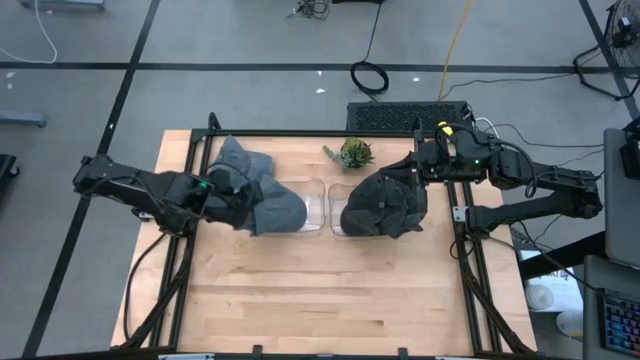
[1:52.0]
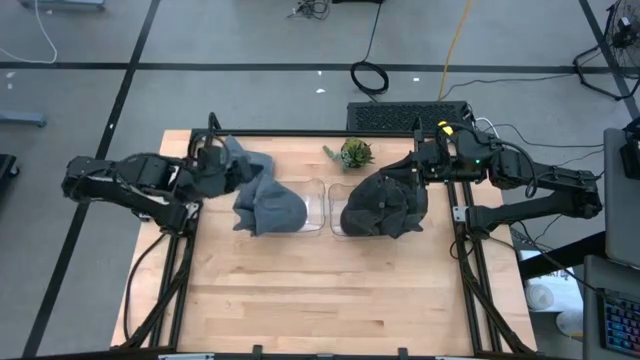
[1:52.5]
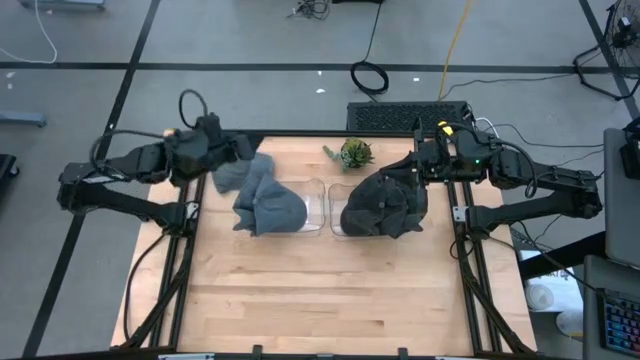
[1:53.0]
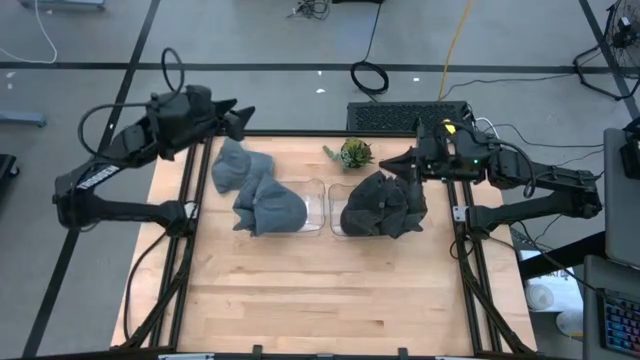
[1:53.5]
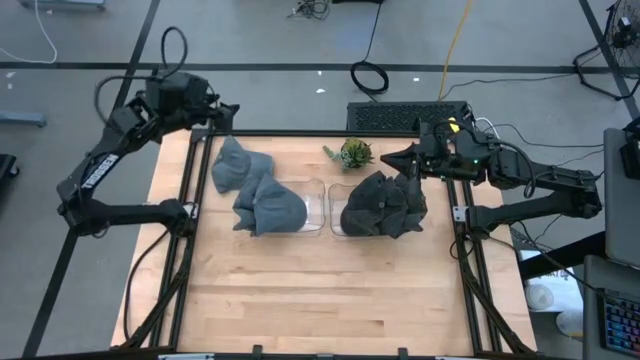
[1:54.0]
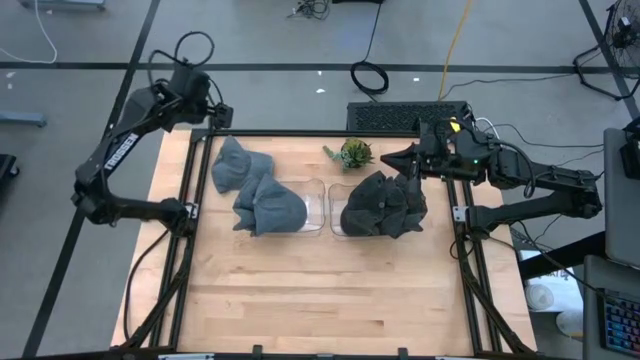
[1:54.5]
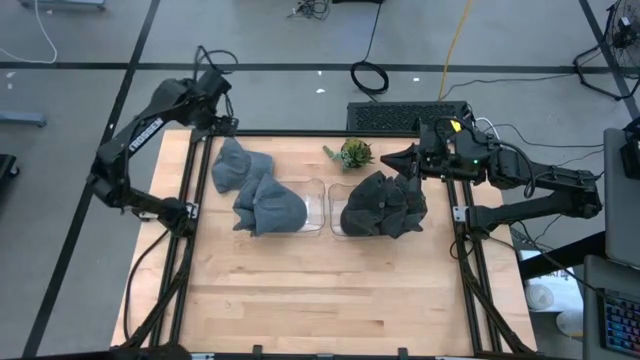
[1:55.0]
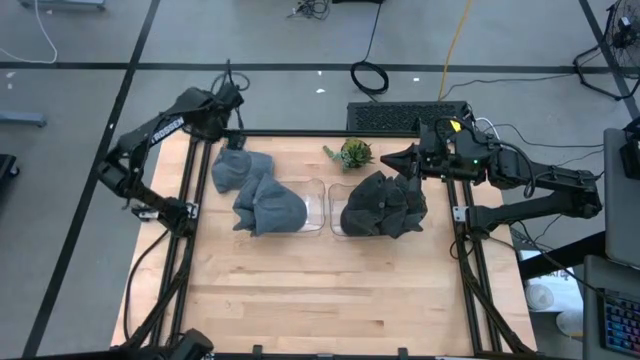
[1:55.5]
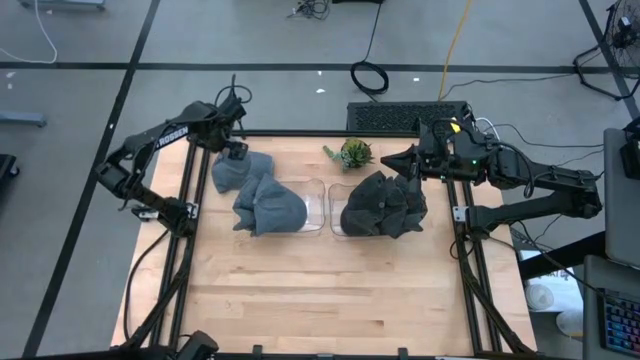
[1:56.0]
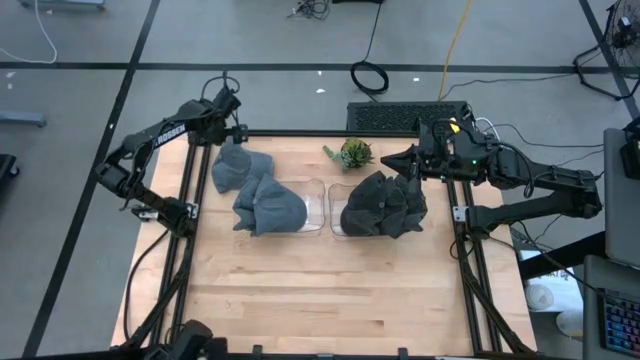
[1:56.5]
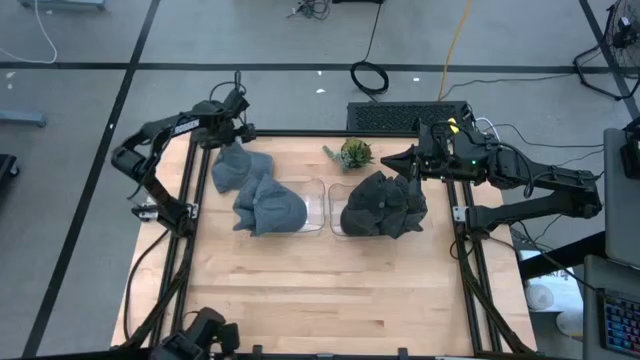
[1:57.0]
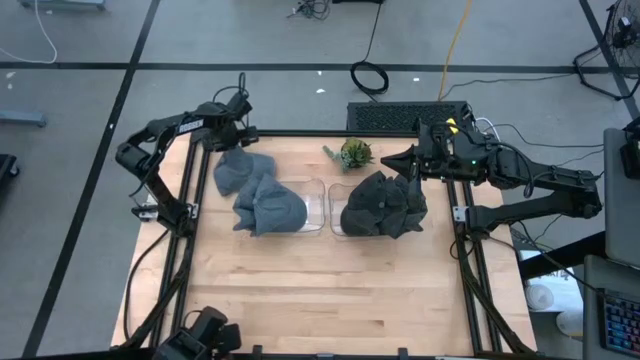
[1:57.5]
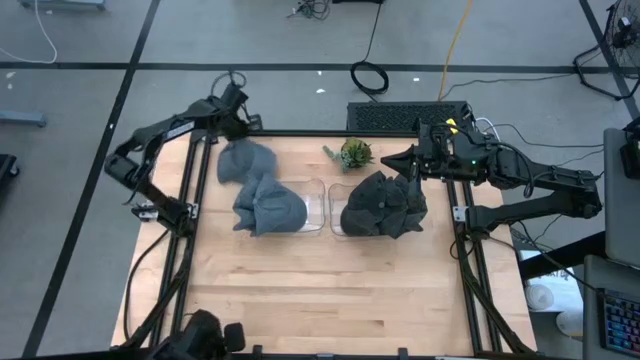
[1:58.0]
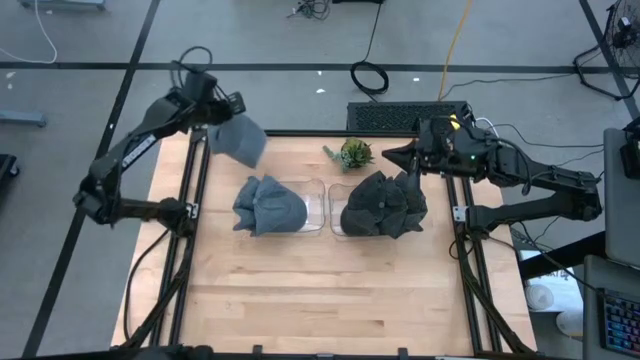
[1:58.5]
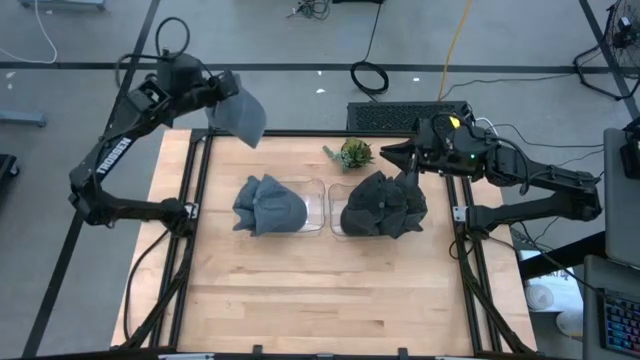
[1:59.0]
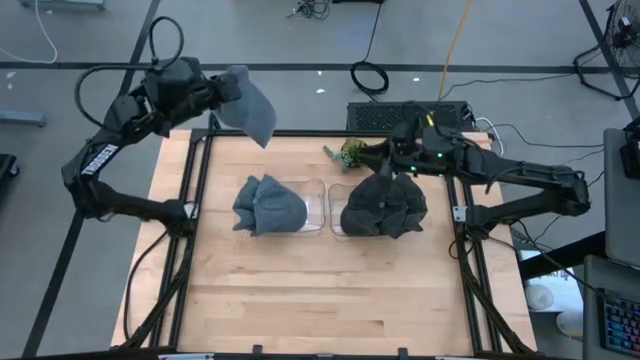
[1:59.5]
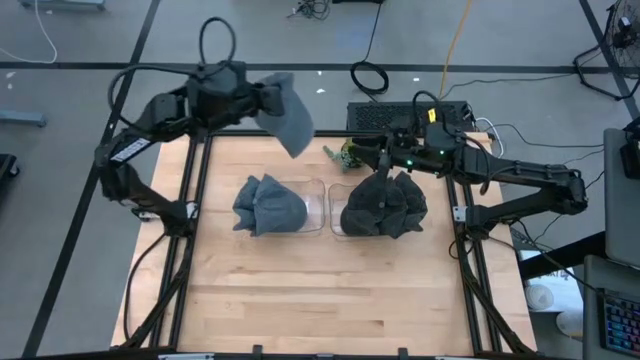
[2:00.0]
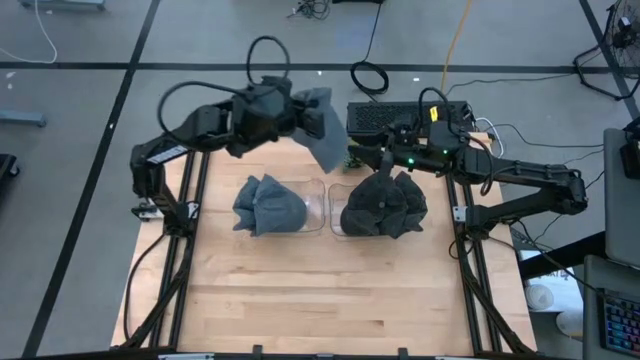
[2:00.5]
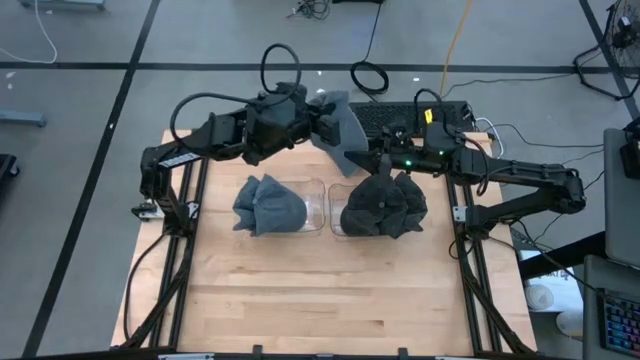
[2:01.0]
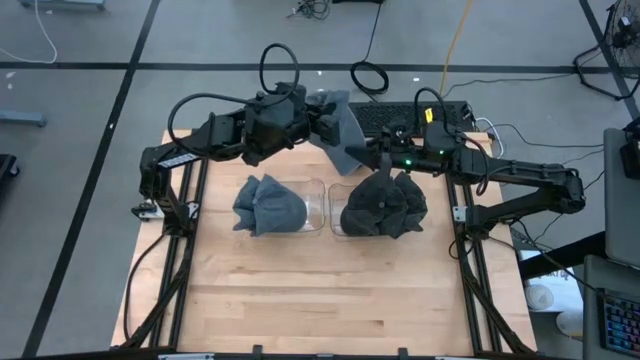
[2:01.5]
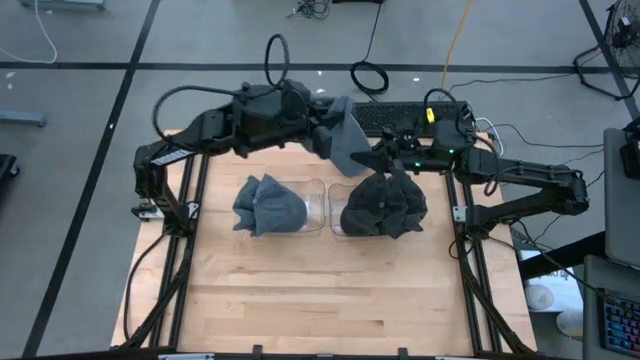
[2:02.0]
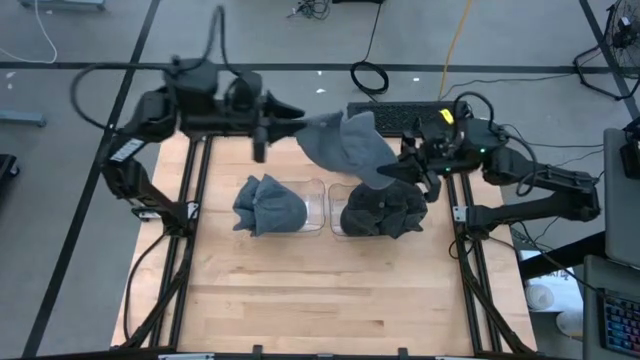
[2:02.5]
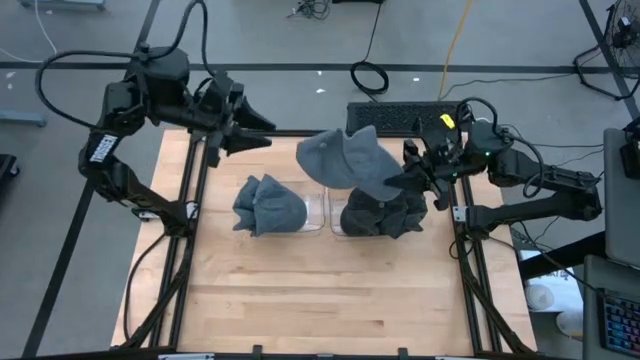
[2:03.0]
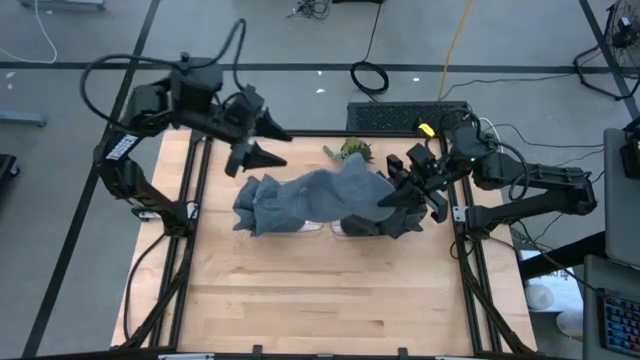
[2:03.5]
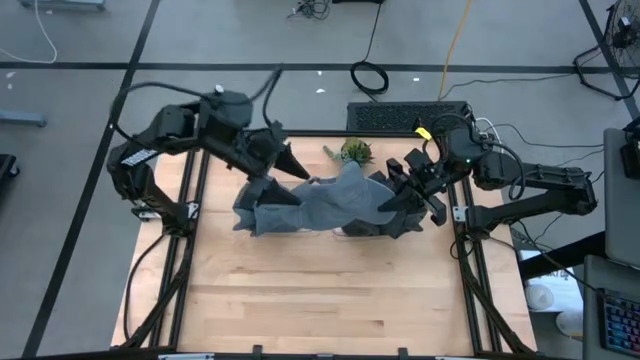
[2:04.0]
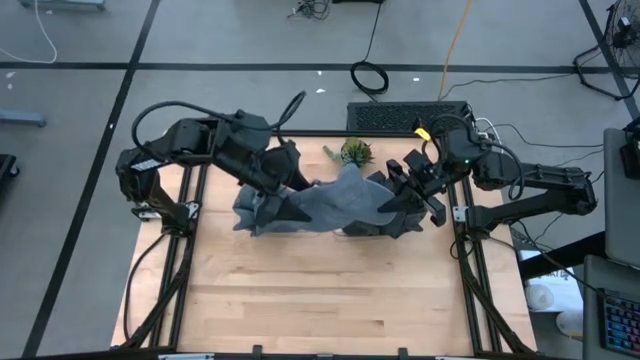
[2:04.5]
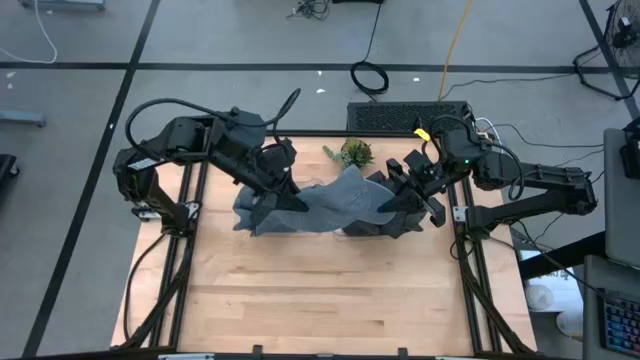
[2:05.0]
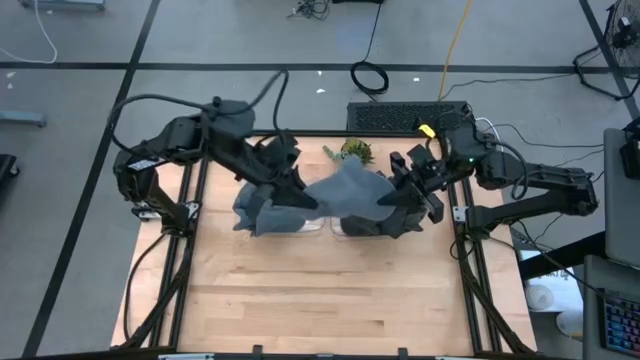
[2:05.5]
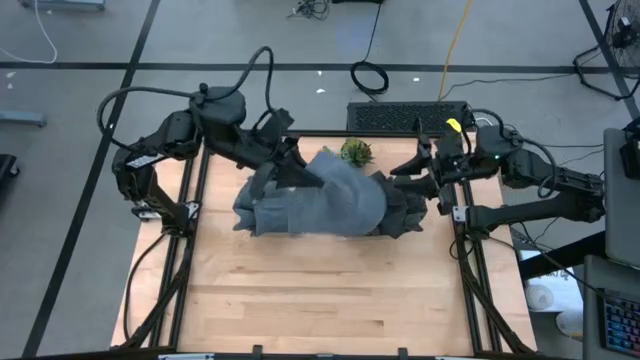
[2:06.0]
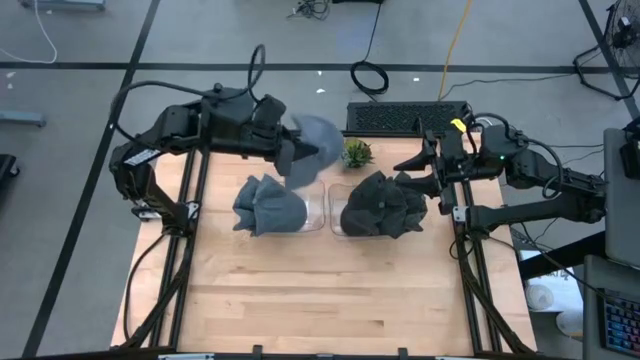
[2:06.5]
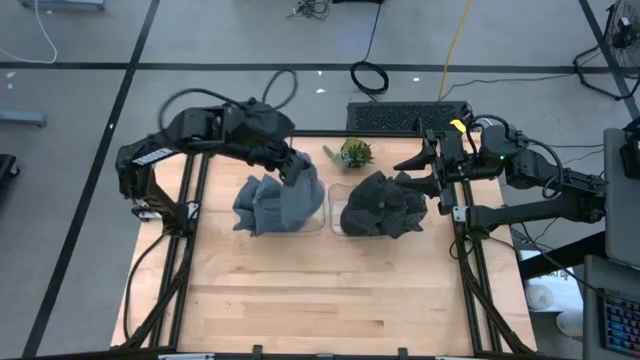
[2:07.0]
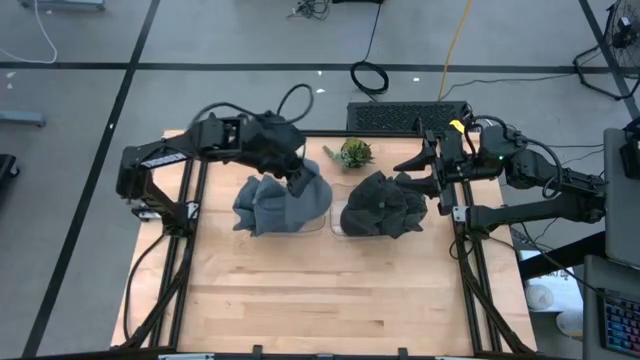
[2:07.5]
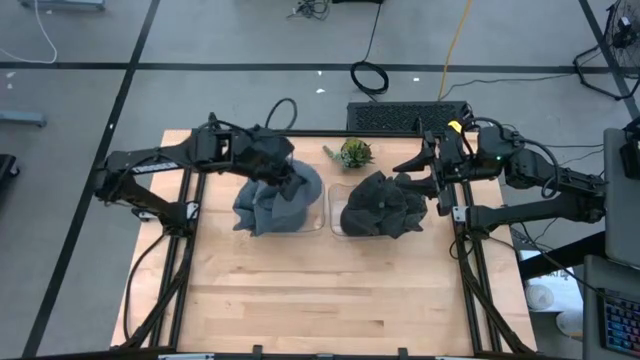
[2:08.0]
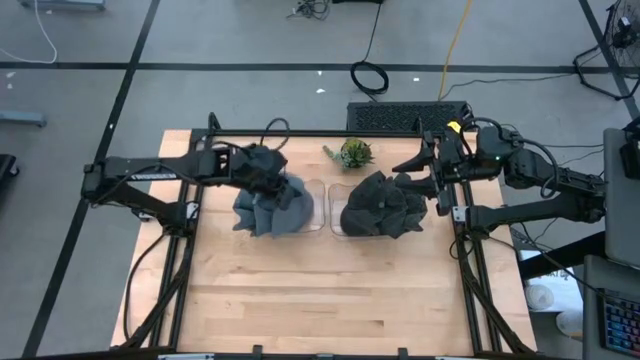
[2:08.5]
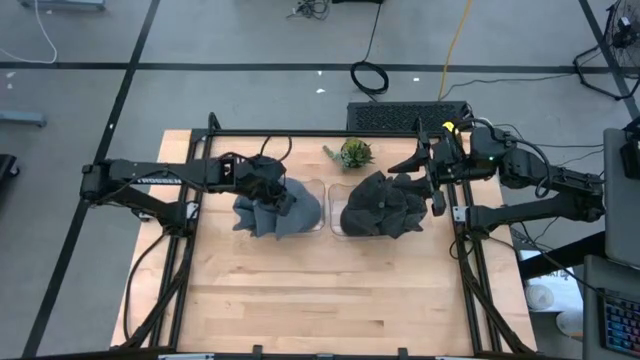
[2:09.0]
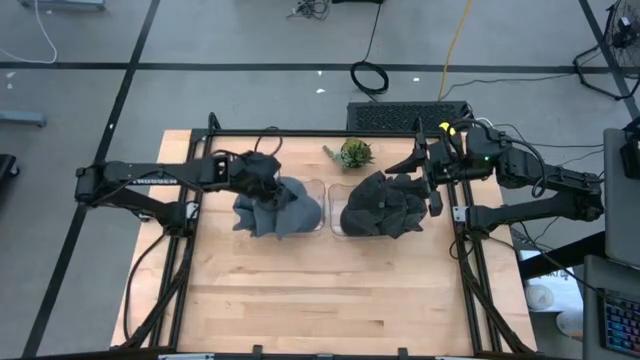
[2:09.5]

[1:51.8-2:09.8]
Task: Pick & Place hat
Put the gray cap into the left transparent bin

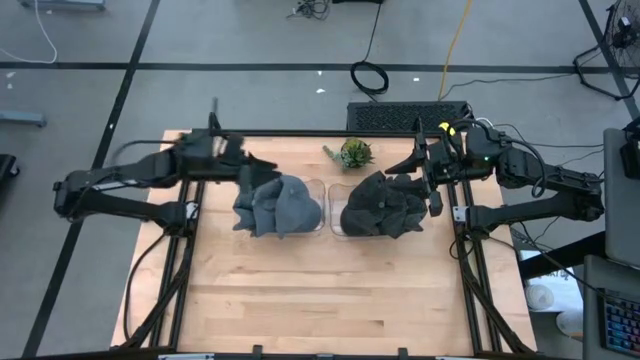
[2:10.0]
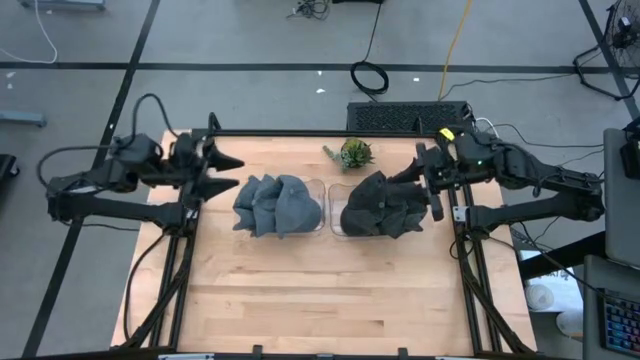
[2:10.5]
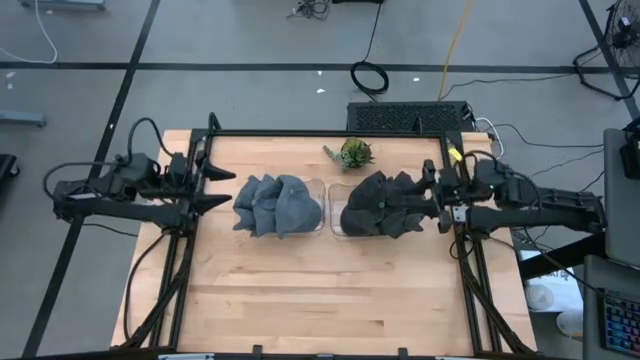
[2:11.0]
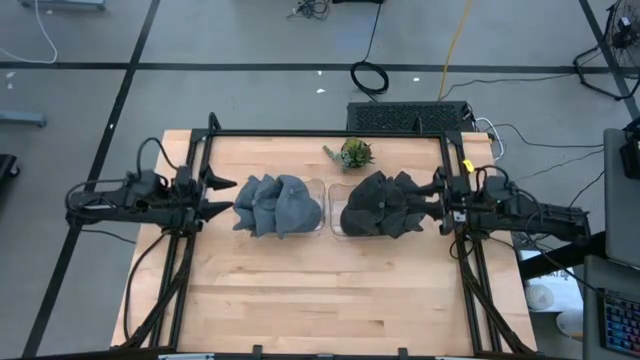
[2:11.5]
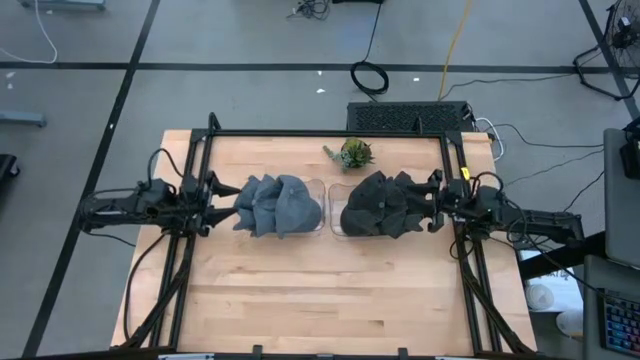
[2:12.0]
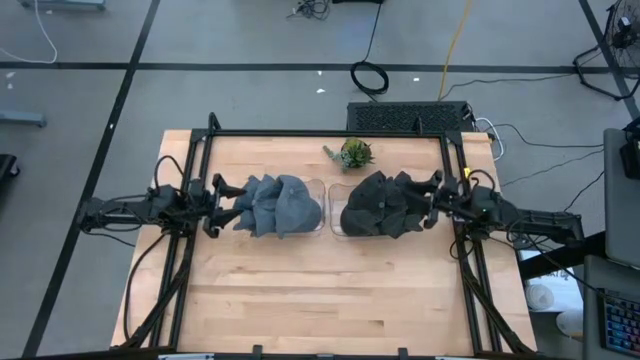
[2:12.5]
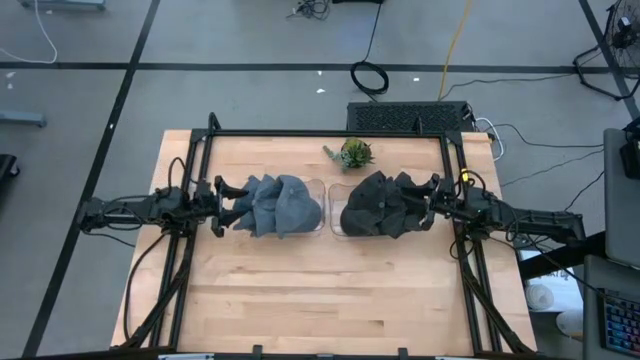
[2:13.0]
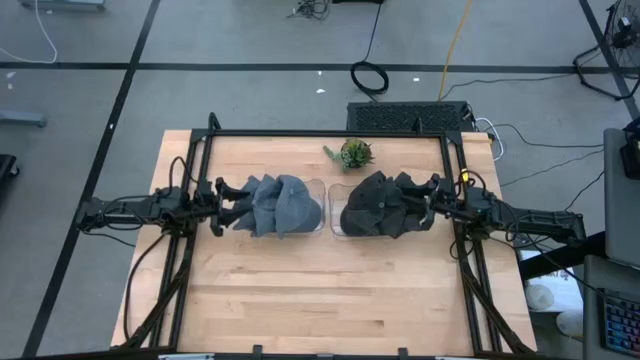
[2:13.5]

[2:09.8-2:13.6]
Return to Home Position
